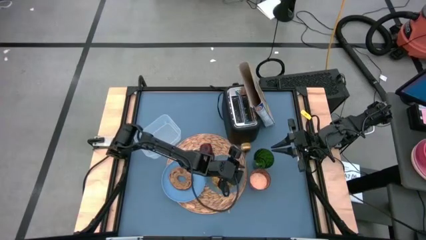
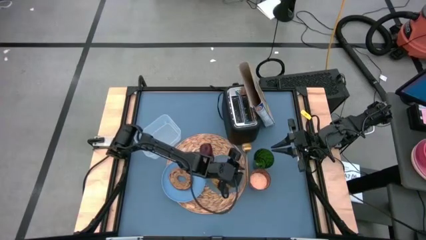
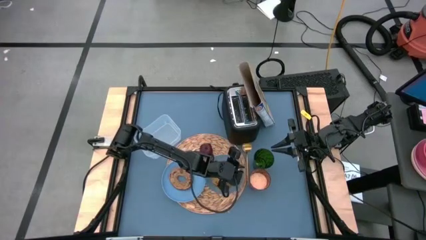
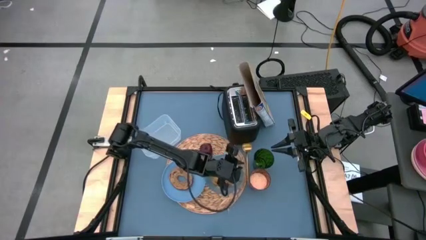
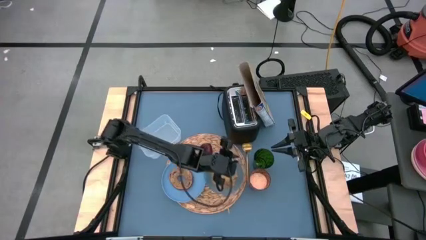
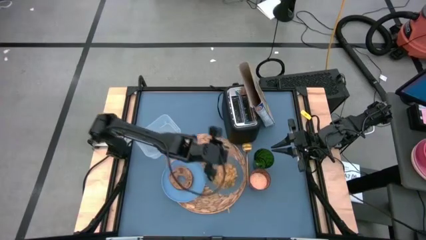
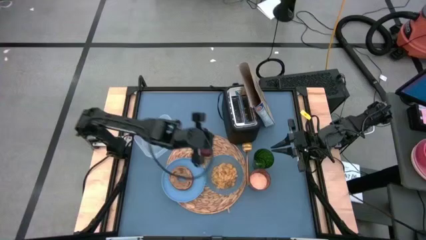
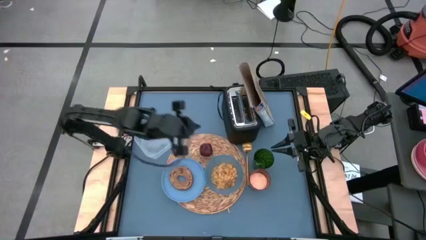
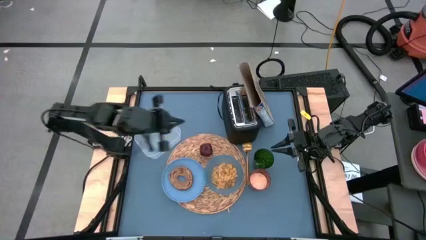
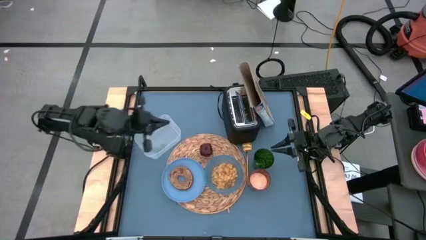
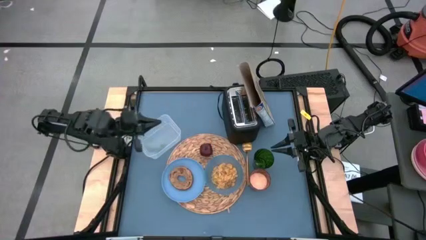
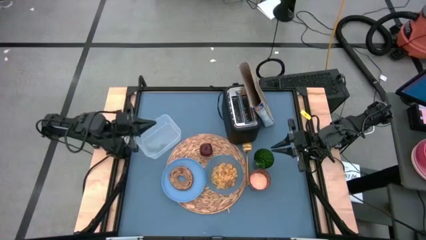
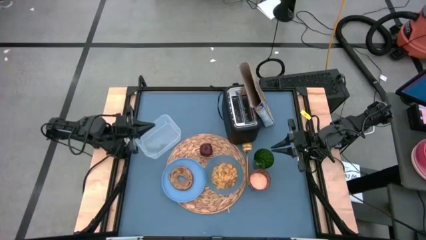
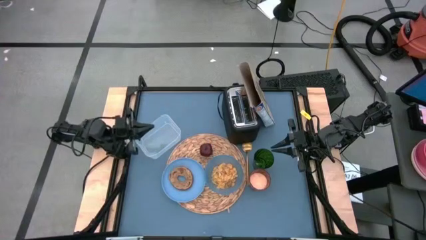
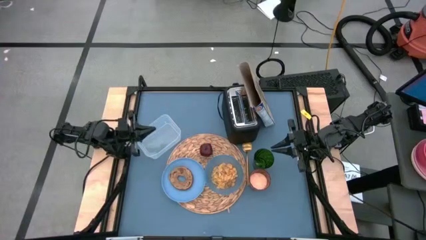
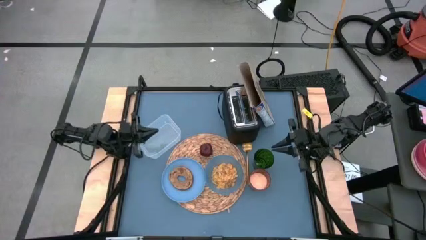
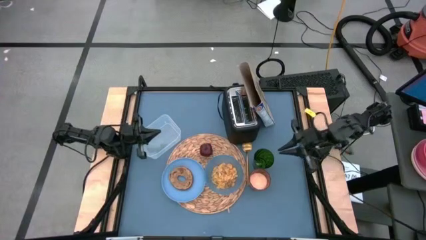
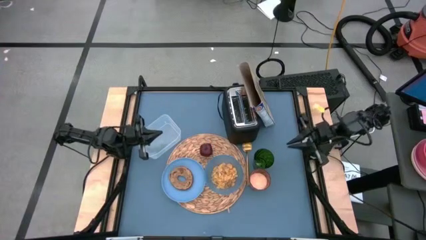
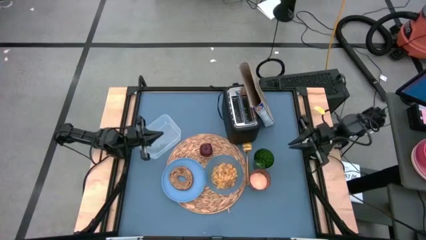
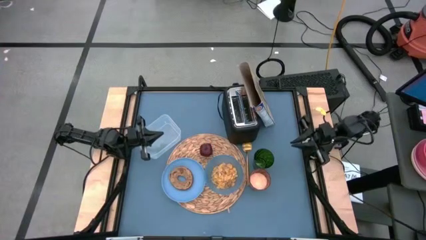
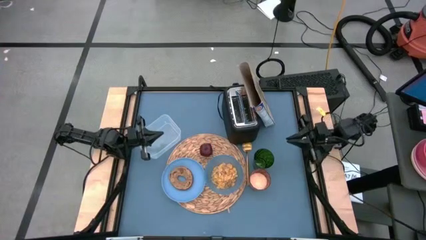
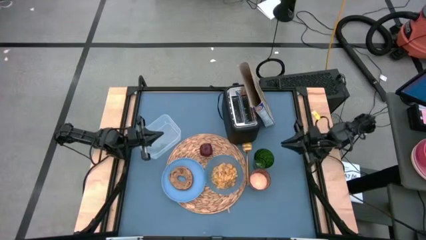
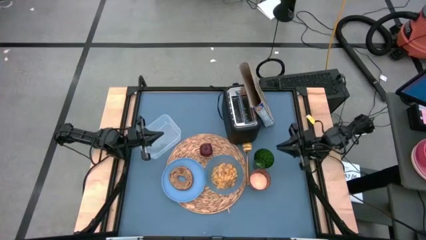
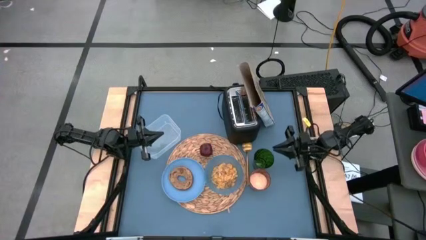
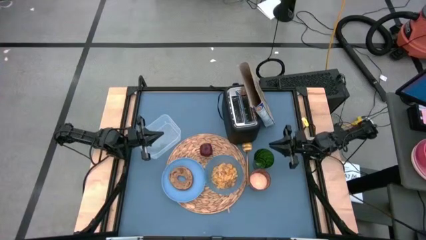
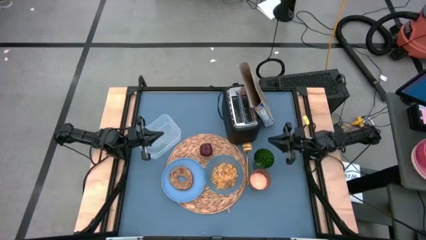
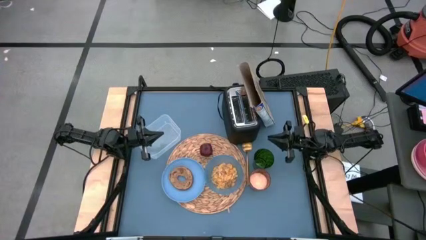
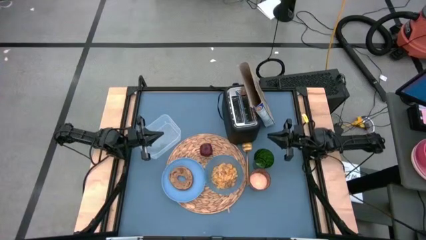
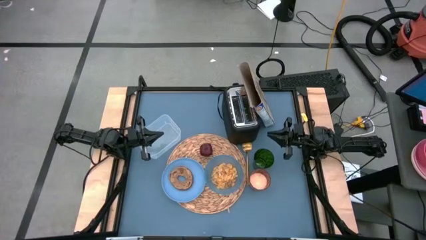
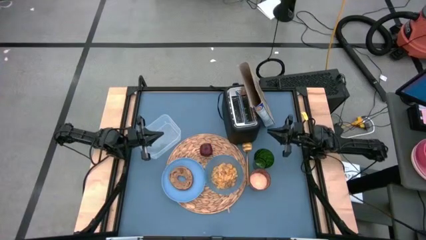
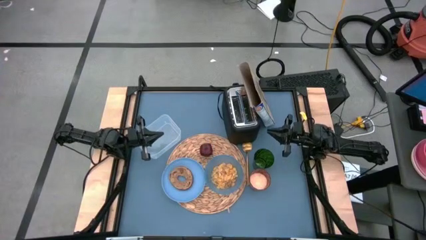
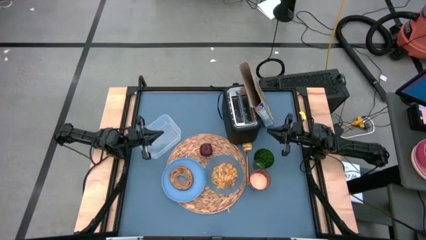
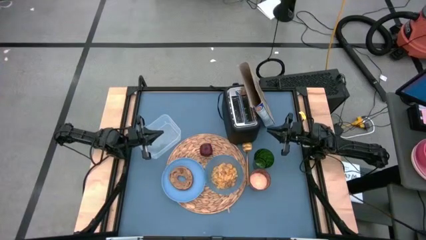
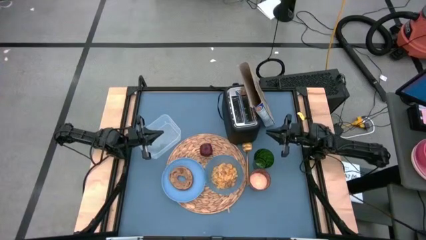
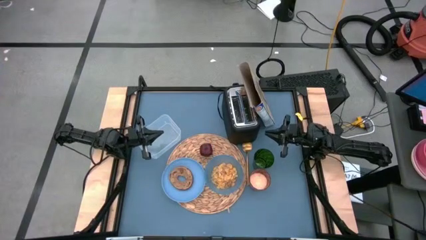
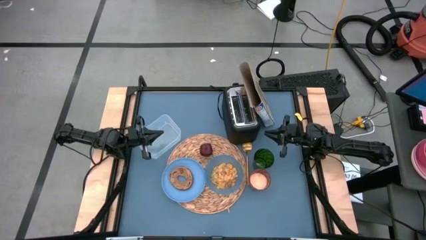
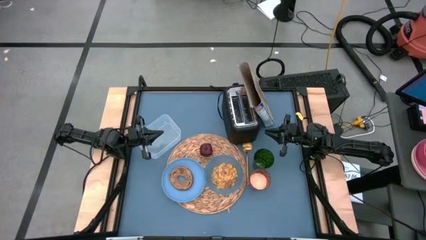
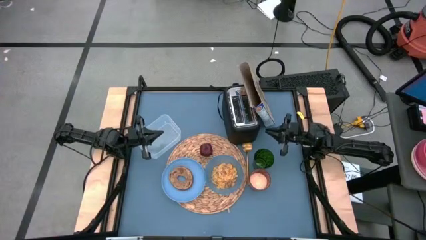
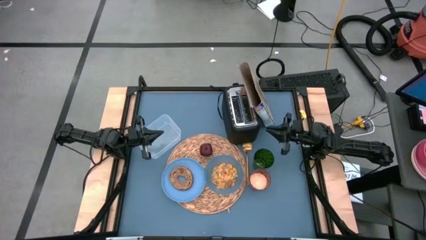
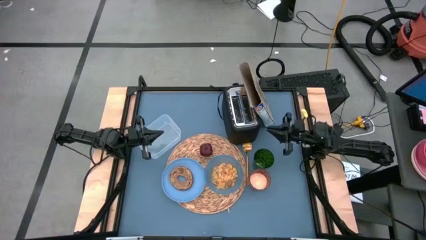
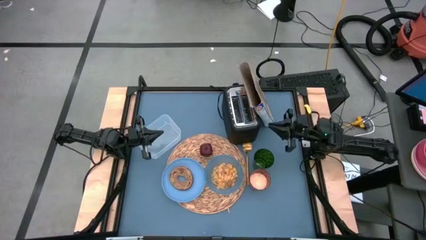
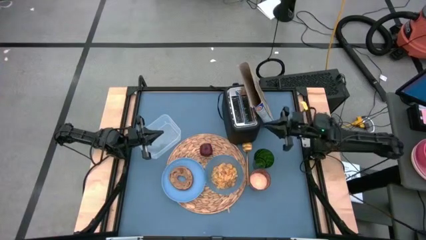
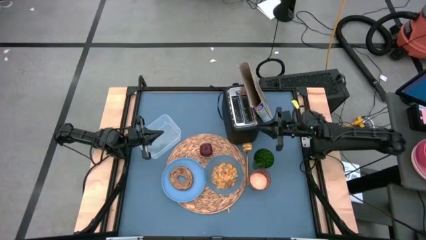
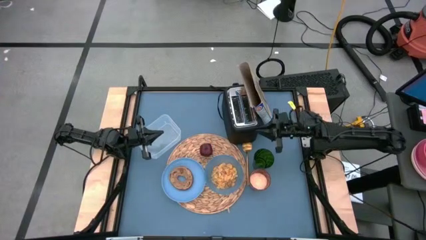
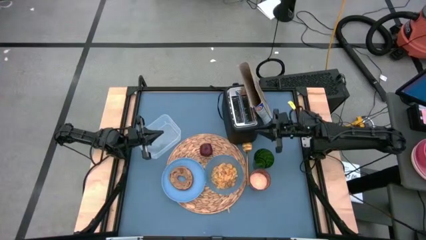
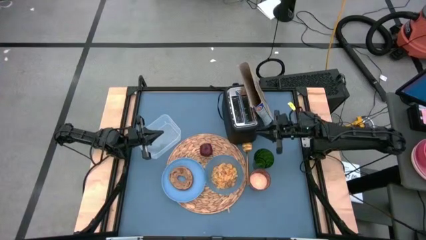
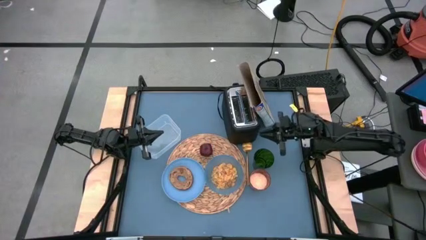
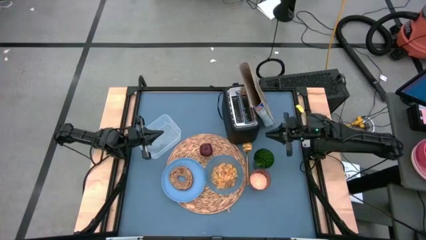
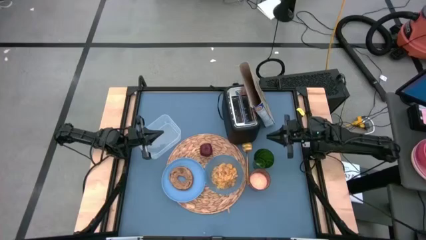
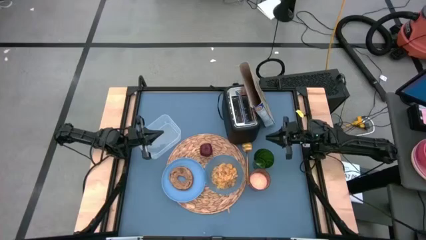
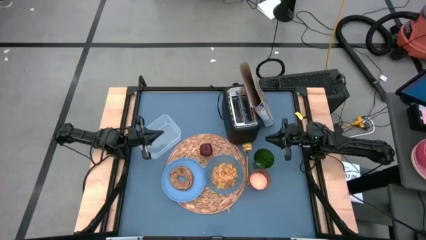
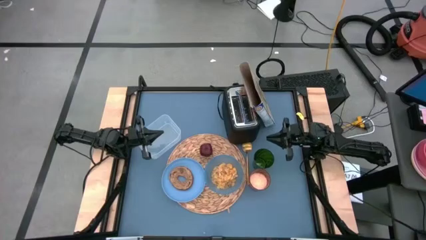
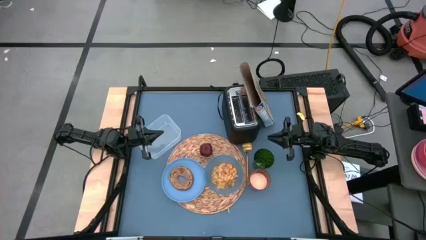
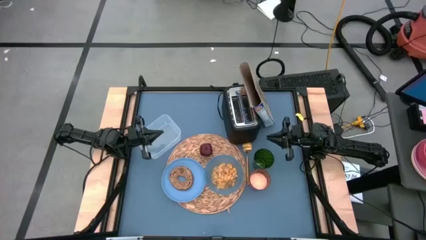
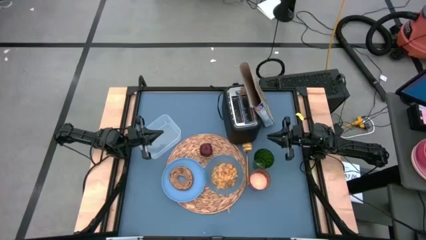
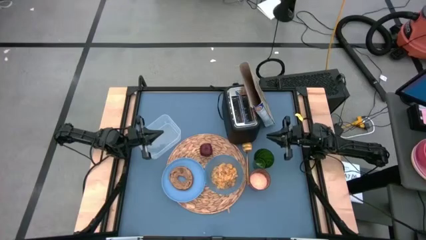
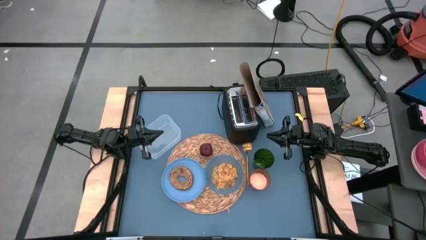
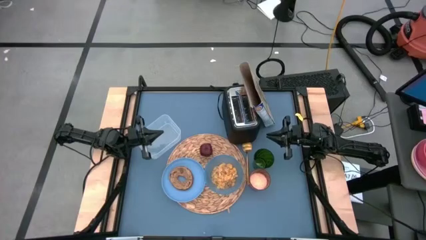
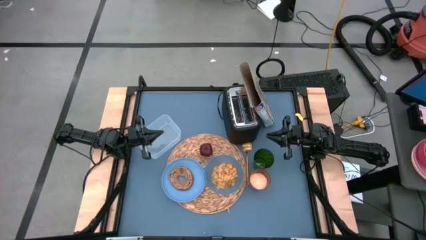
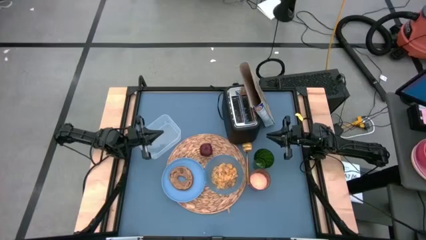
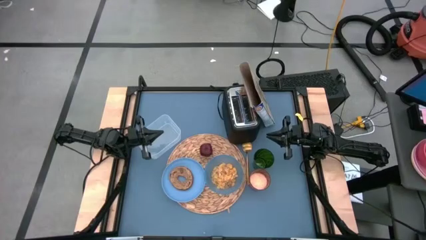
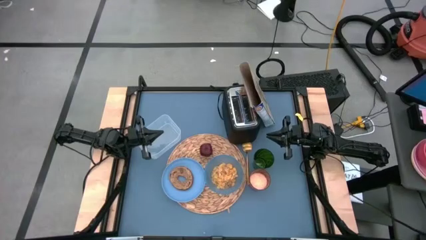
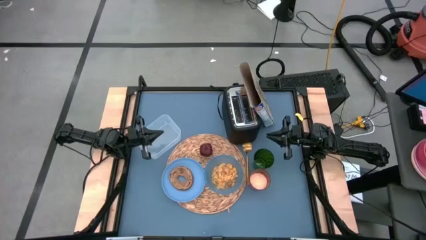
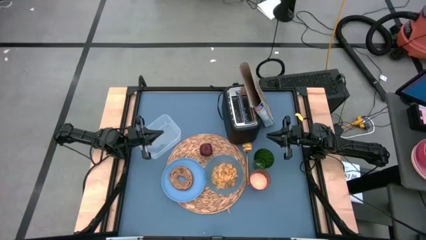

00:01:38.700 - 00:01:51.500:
Task: Arrange a breakfast setting
Return to Home Position
